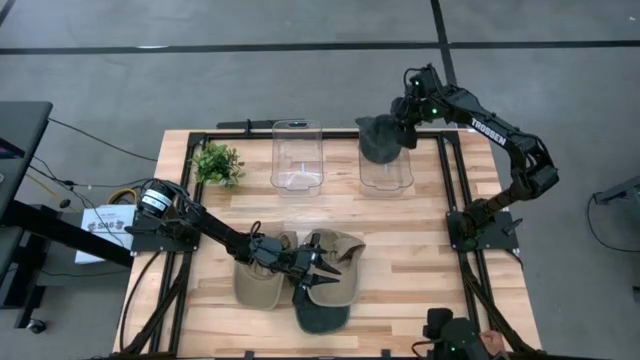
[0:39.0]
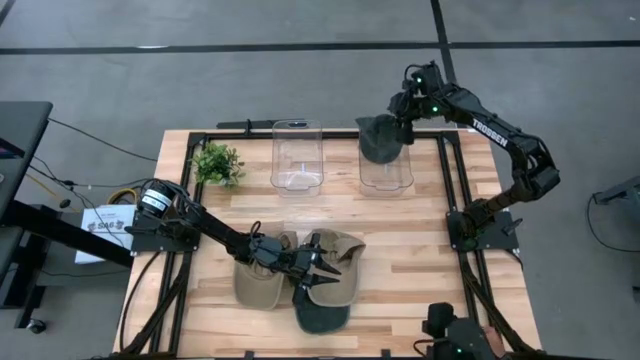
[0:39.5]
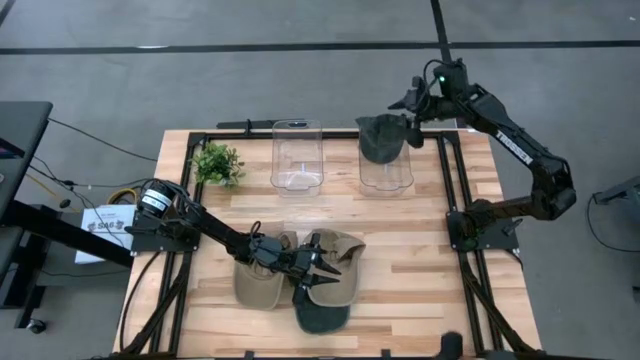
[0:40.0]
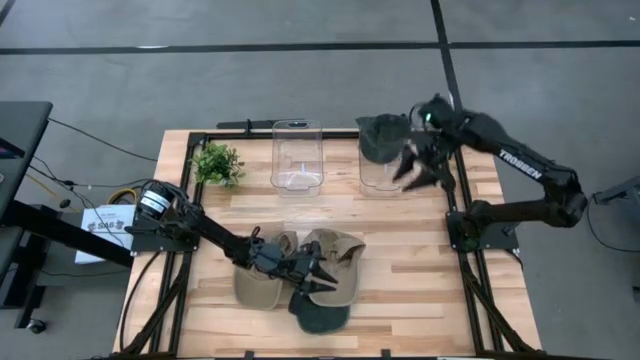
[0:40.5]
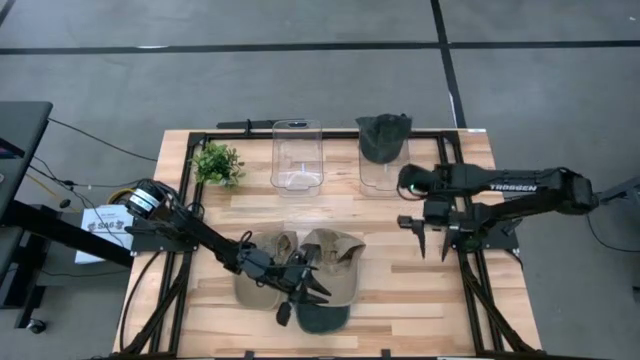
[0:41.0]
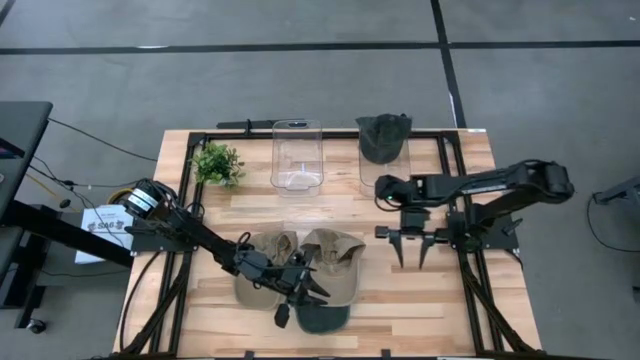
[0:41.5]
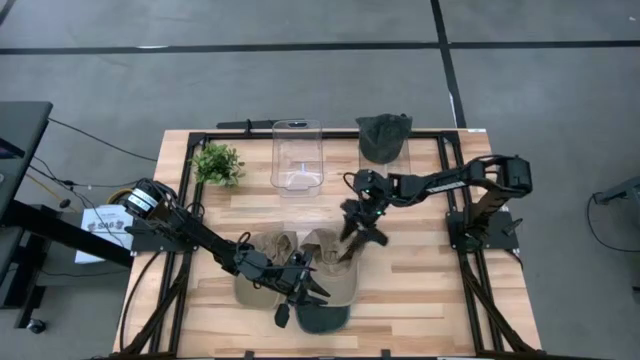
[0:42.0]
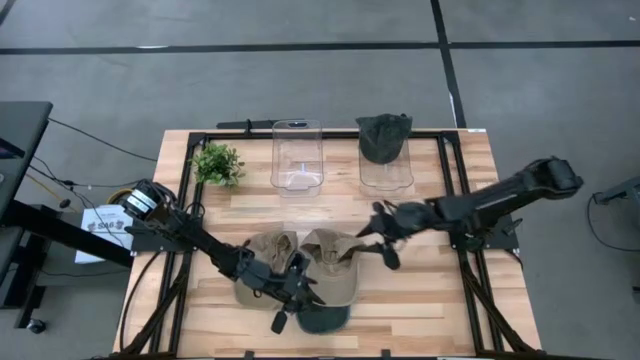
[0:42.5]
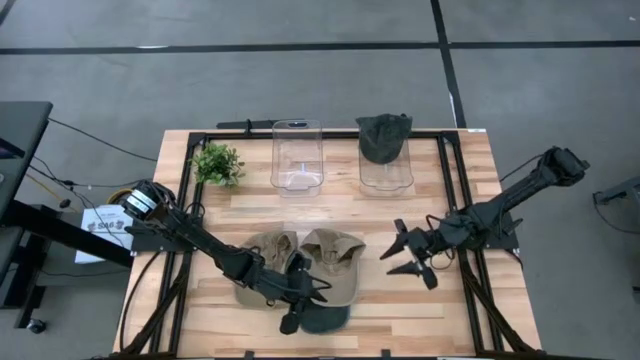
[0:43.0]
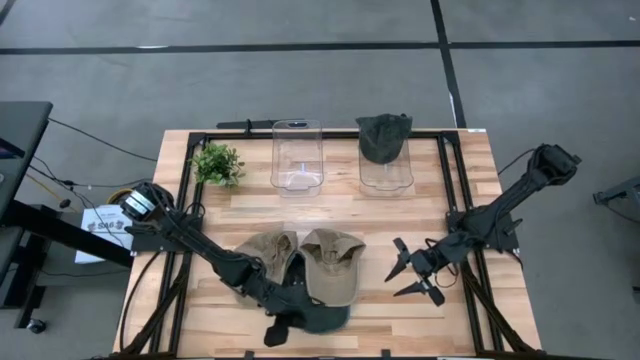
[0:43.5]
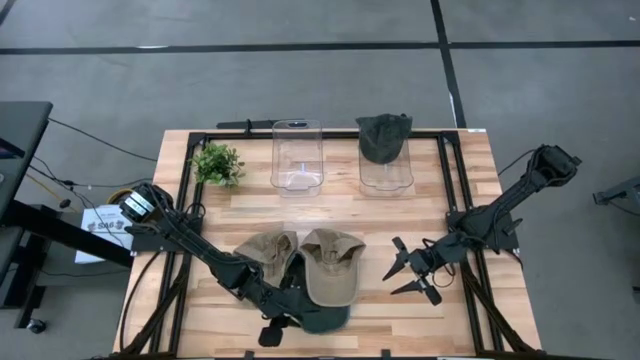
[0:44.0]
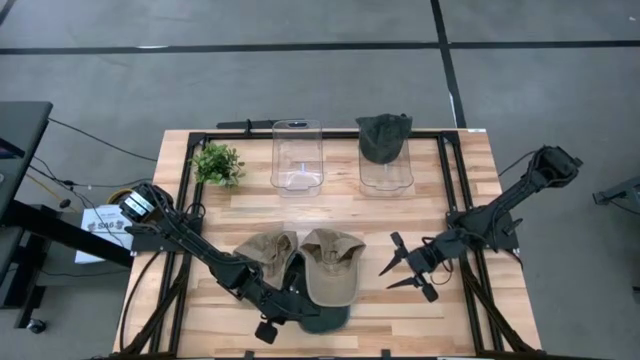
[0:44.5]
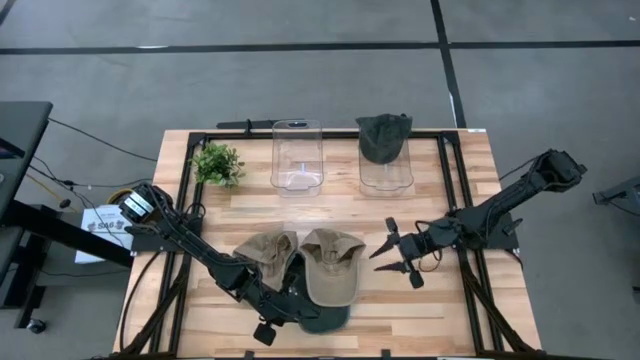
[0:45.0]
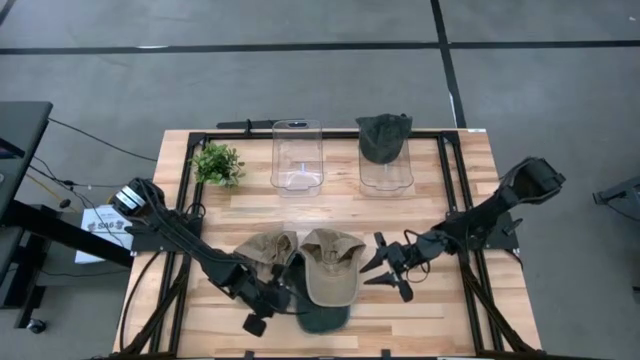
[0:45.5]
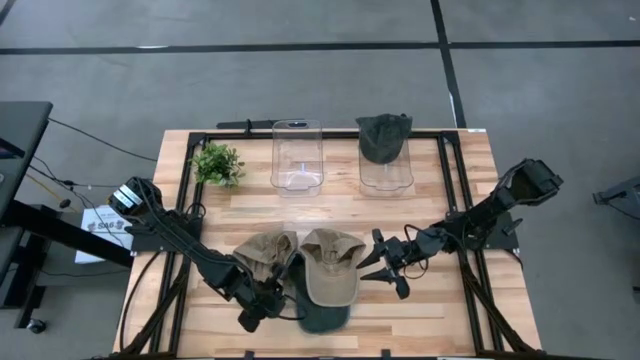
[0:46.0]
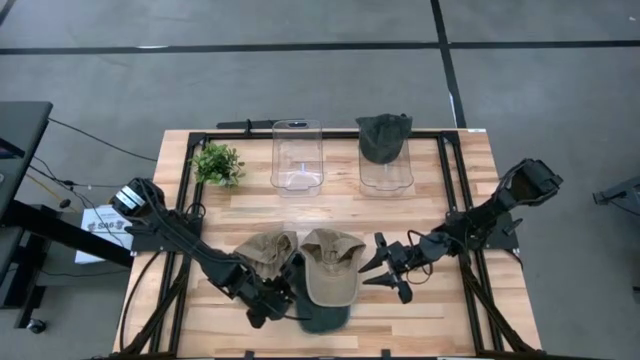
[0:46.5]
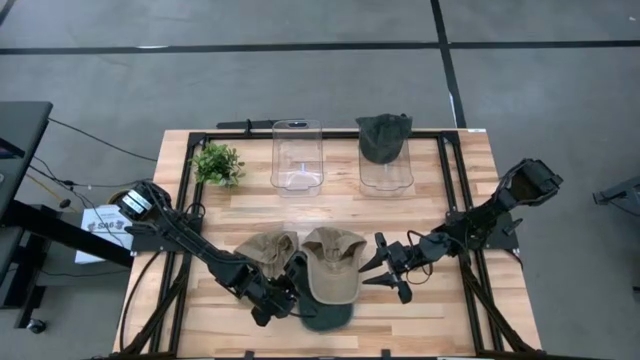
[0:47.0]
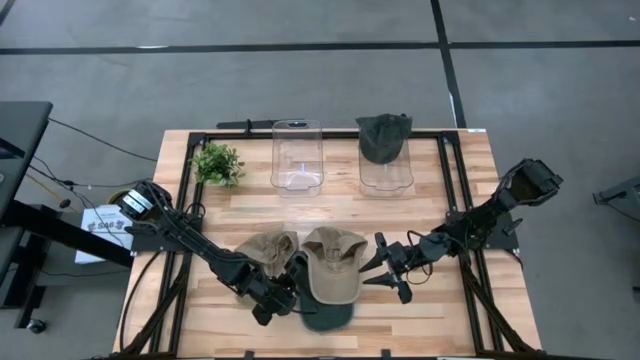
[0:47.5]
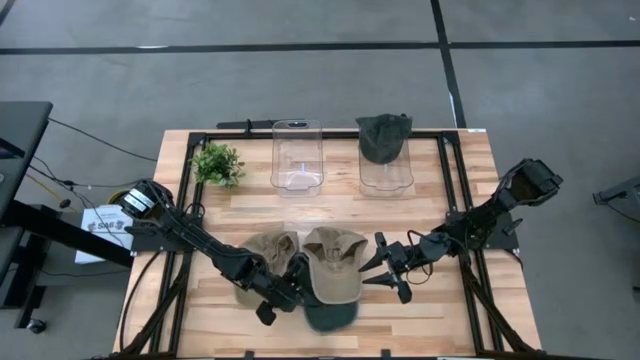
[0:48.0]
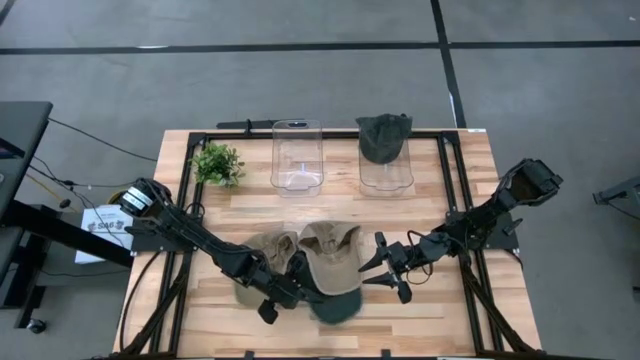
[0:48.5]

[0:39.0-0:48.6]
Task: Pick & Place hat
Put the black cap into the right transparent bin

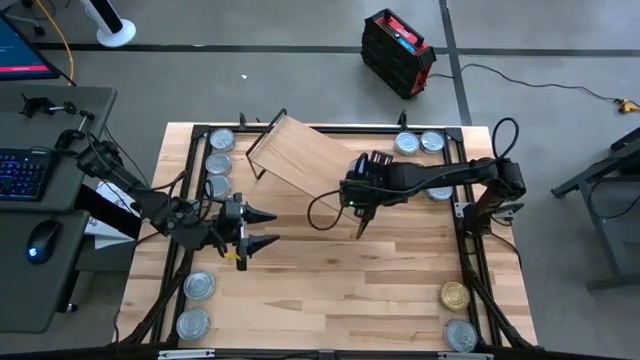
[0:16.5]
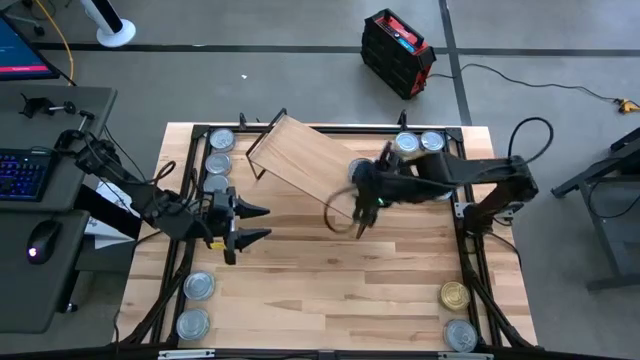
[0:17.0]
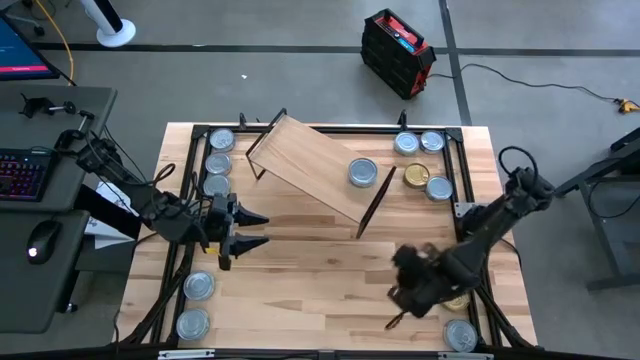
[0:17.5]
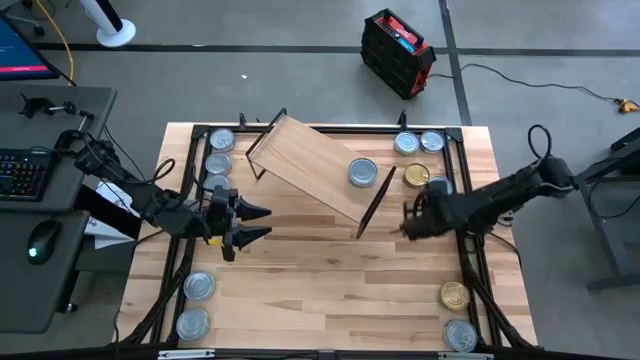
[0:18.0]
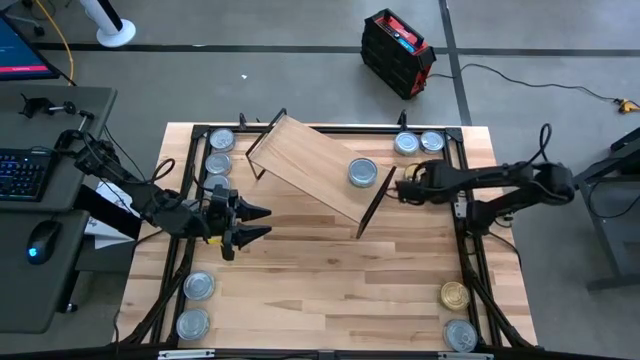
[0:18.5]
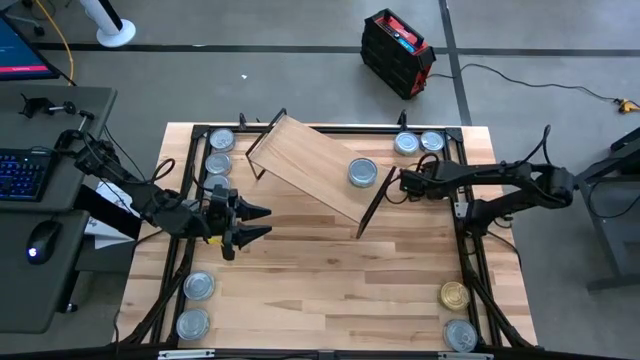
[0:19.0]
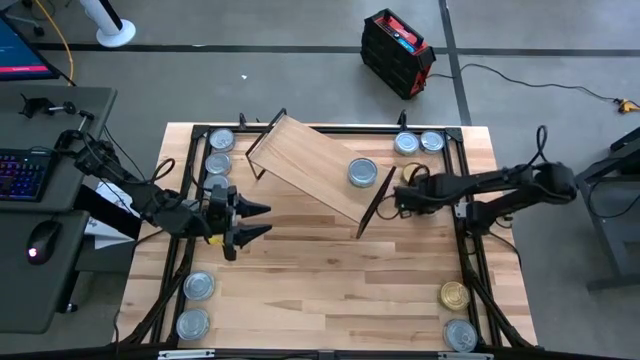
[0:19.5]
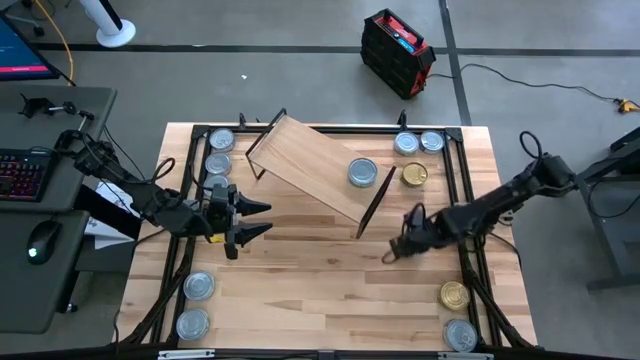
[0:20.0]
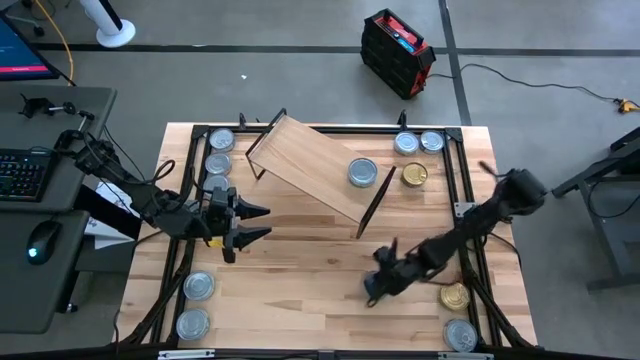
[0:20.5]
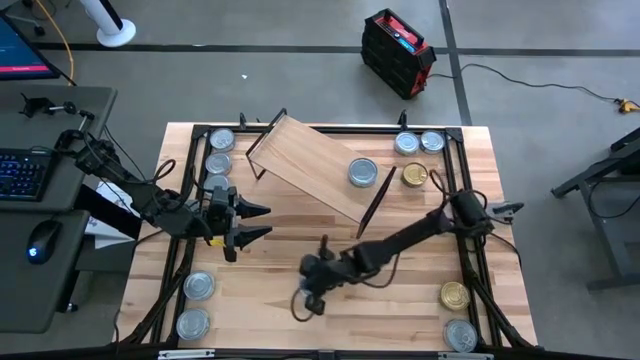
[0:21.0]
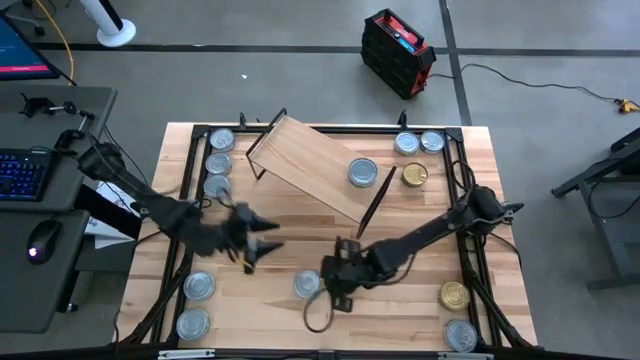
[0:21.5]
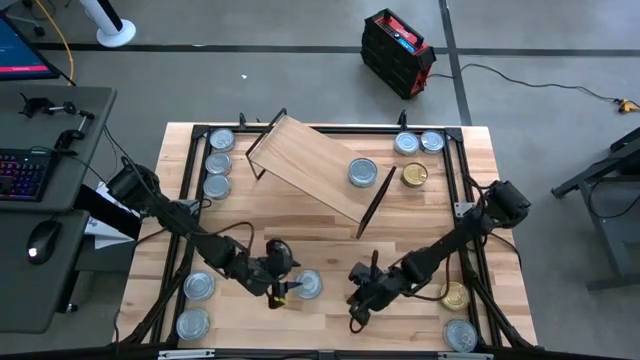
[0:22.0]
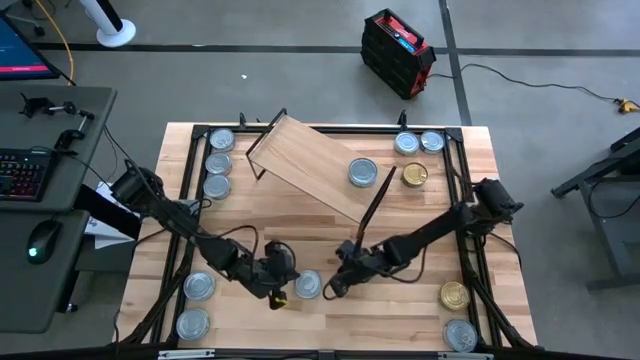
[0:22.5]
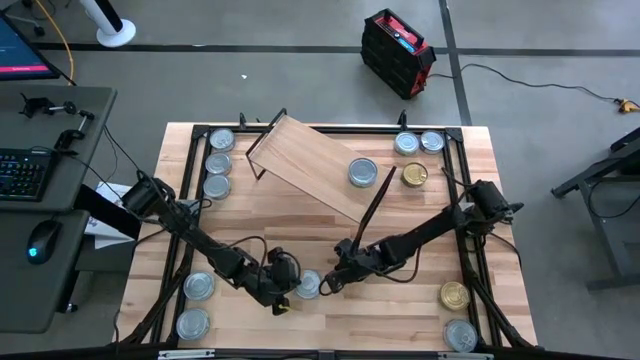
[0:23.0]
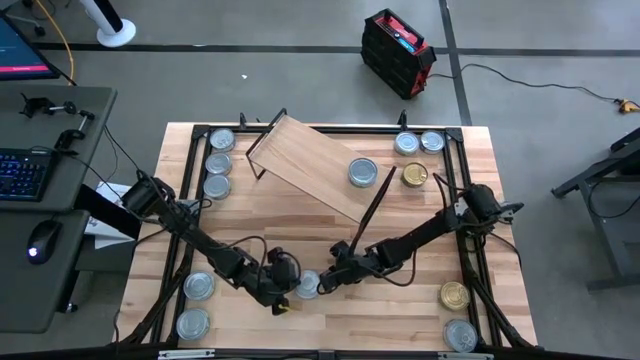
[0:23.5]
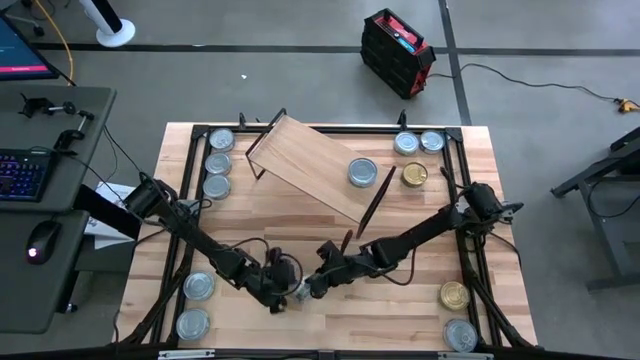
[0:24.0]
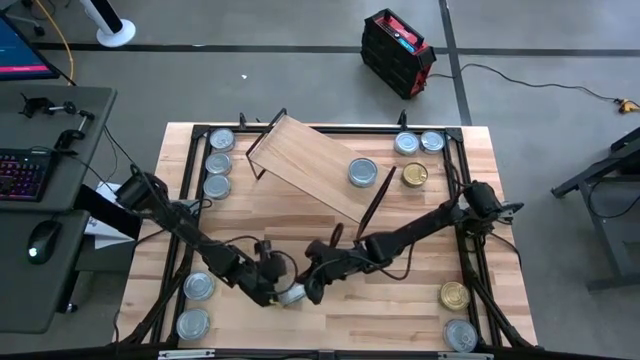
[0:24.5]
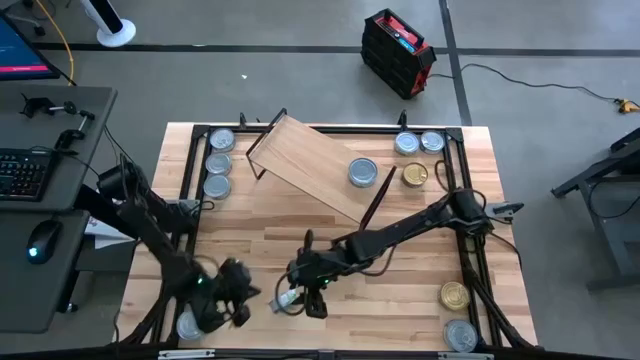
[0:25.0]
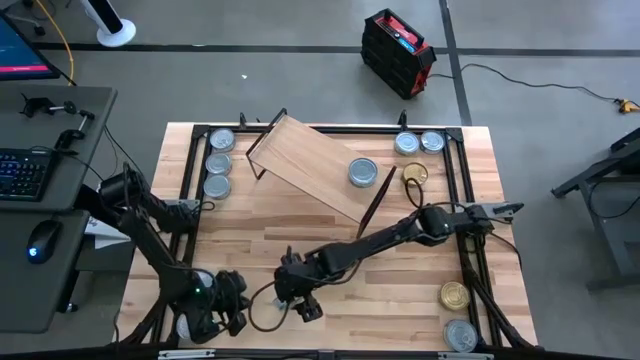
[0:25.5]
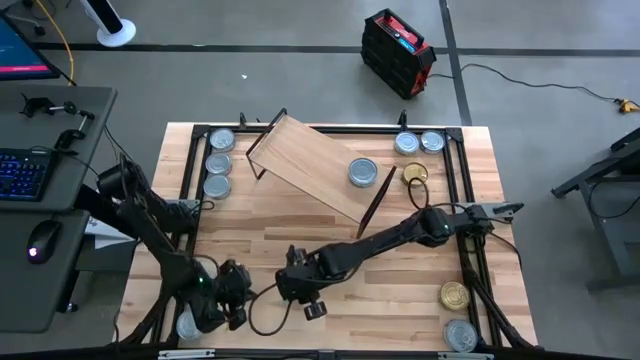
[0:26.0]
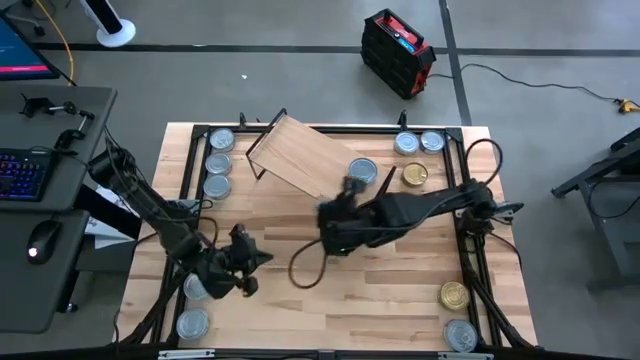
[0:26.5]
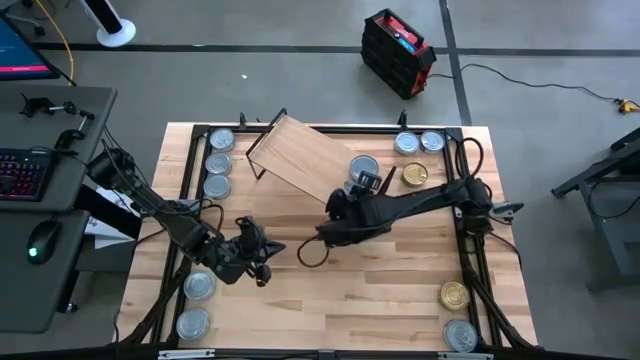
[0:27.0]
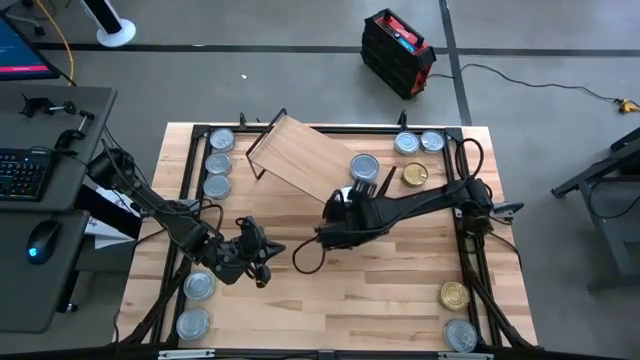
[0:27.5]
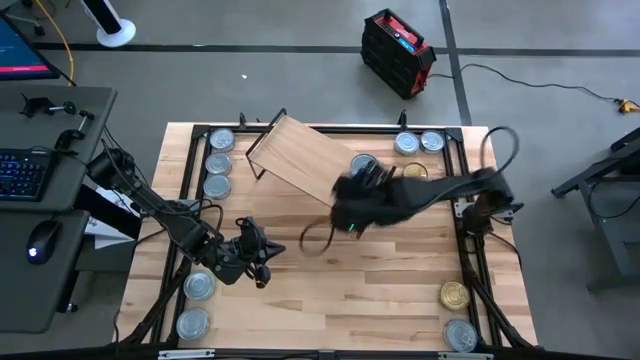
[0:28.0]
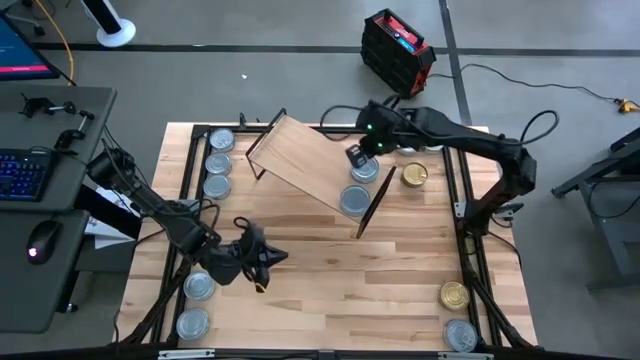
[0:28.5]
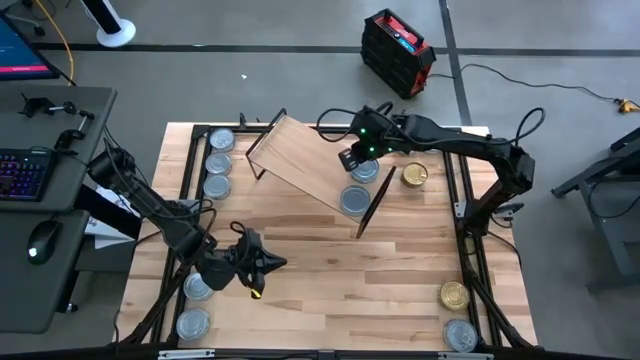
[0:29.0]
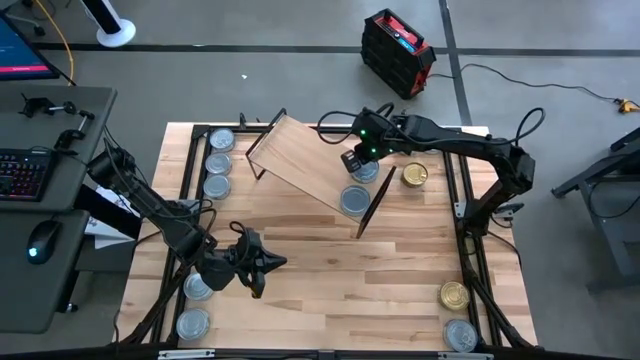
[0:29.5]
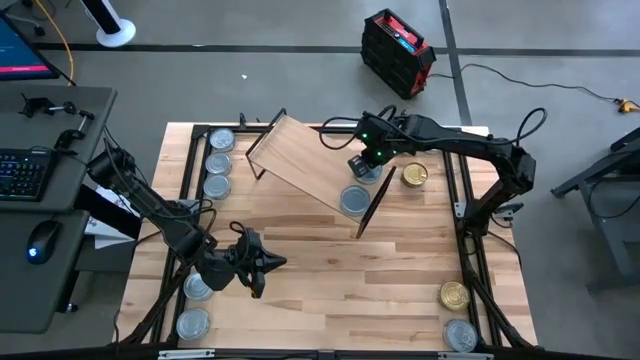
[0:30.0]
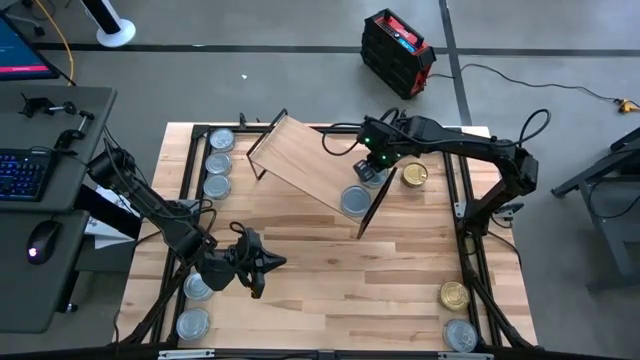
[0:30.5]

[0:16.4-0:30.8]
Task: Stack canned seafood by type on shelf
Stack the white-green tuna can on top of the other white-green tuna can on the shelf
